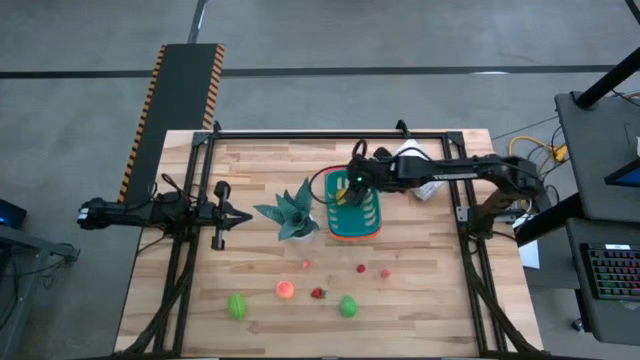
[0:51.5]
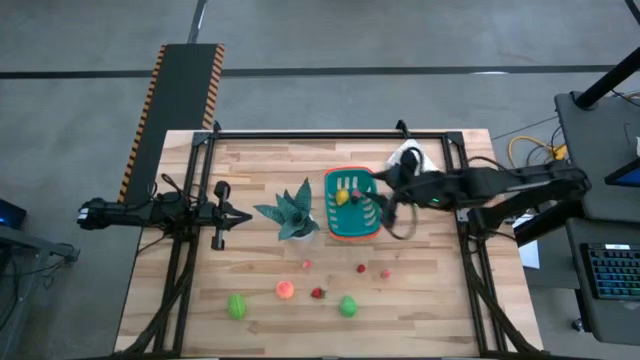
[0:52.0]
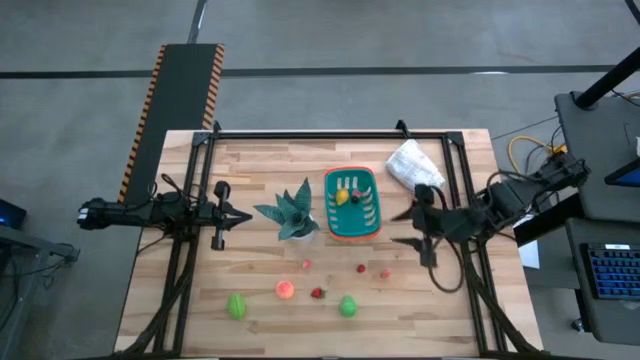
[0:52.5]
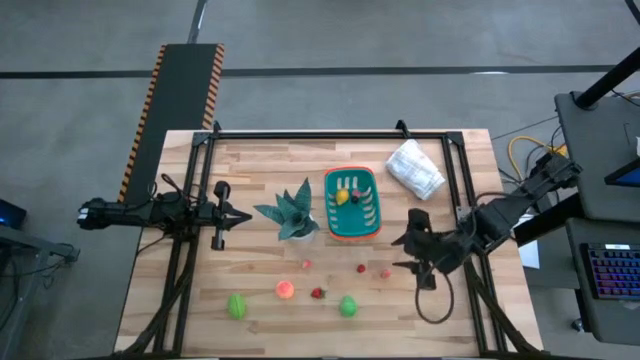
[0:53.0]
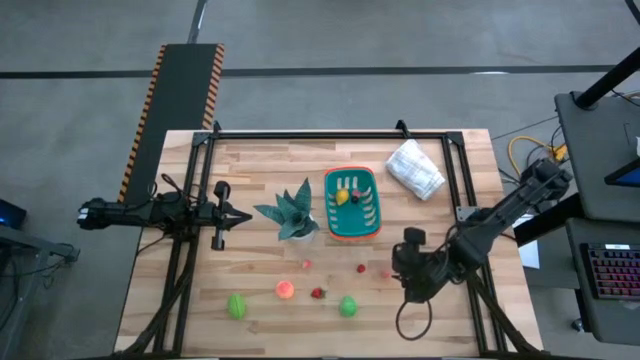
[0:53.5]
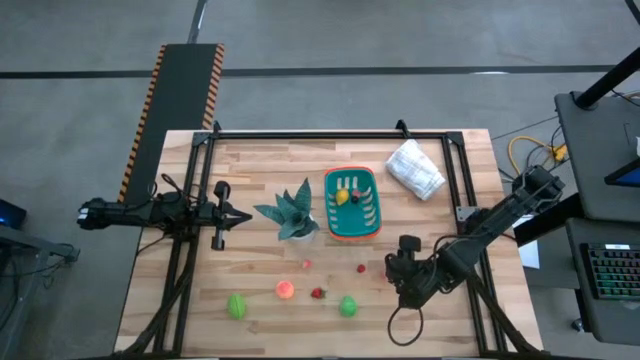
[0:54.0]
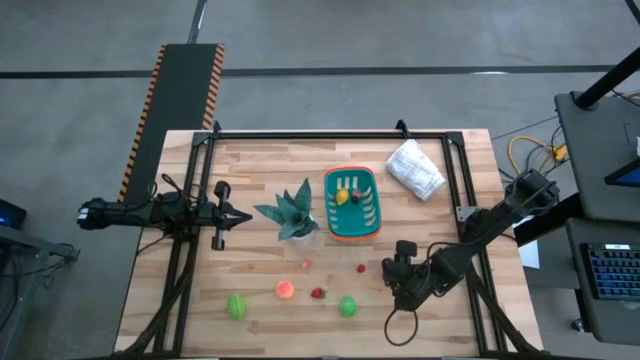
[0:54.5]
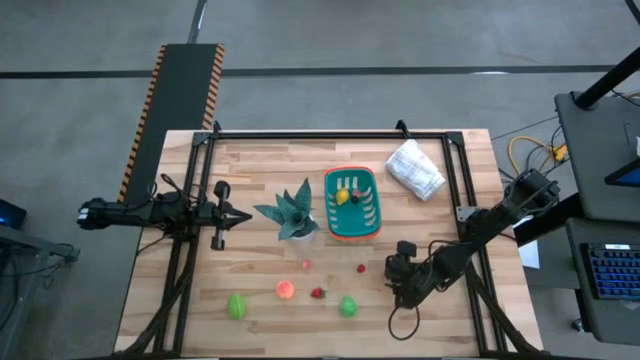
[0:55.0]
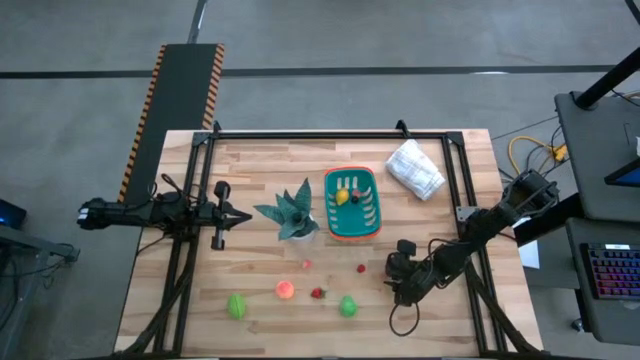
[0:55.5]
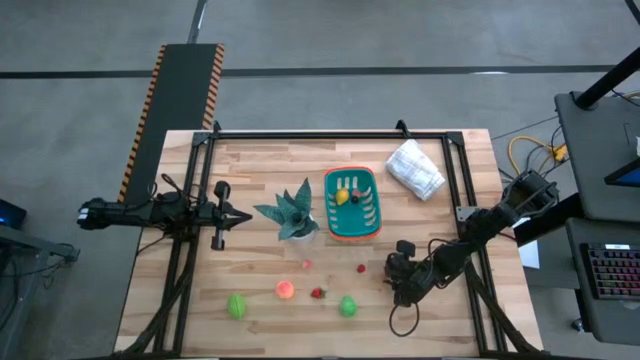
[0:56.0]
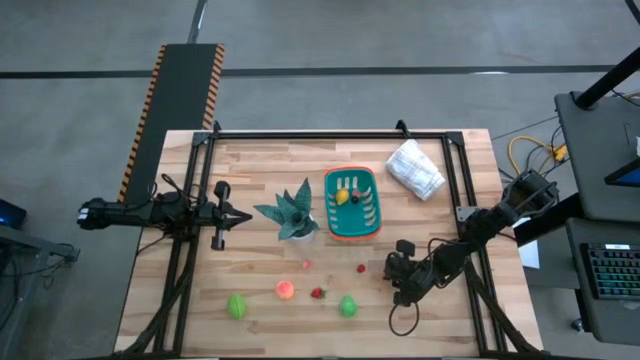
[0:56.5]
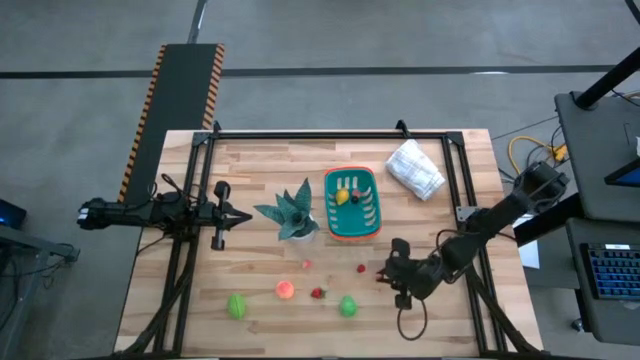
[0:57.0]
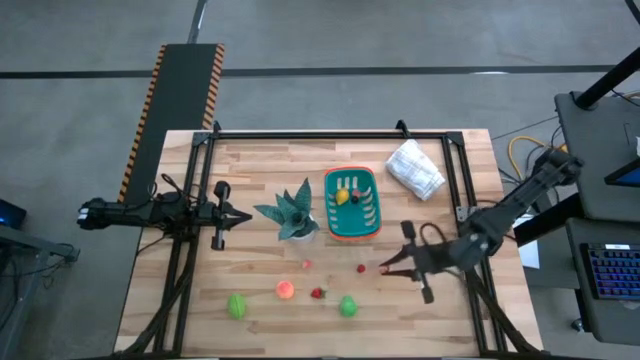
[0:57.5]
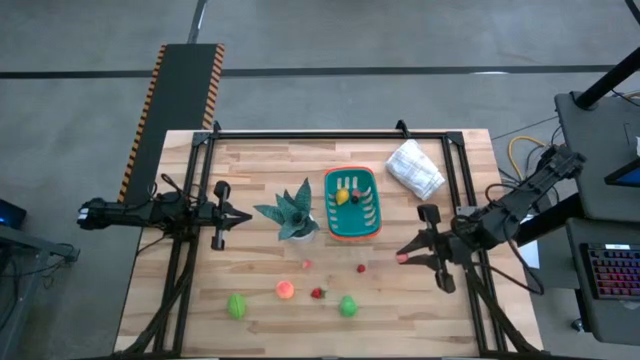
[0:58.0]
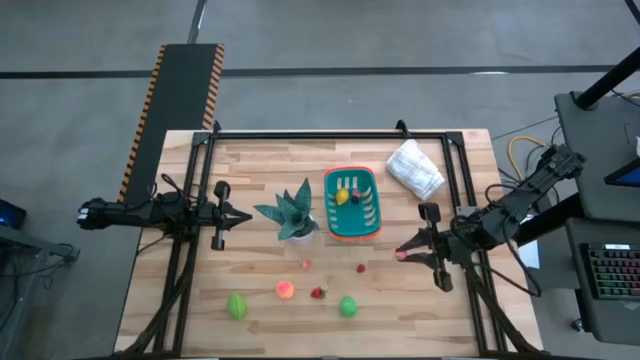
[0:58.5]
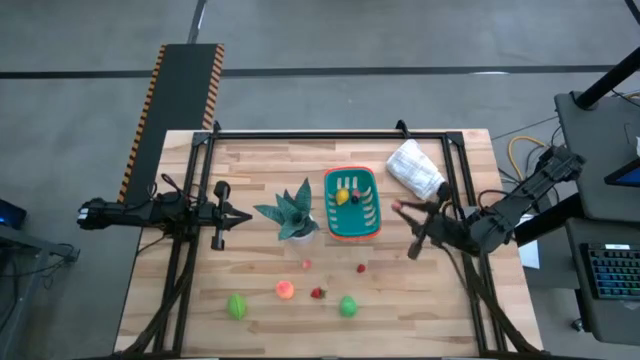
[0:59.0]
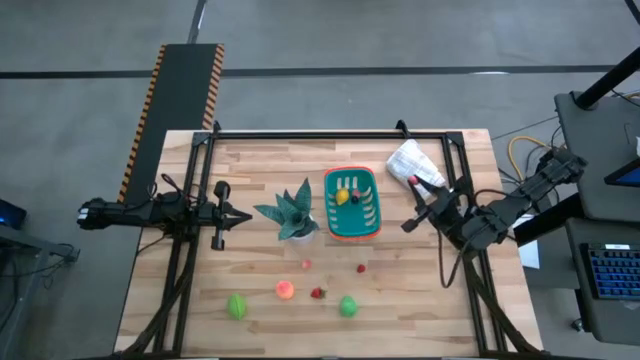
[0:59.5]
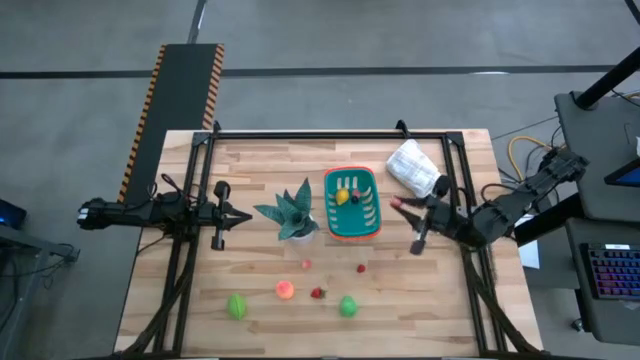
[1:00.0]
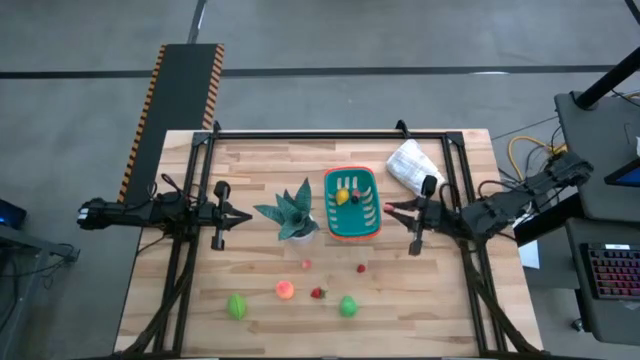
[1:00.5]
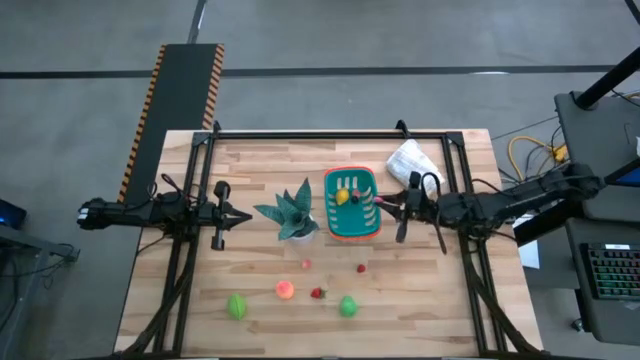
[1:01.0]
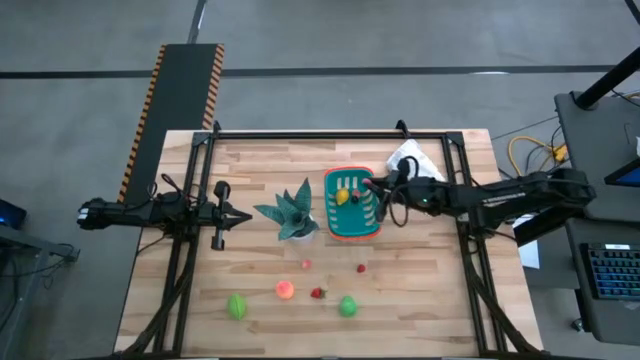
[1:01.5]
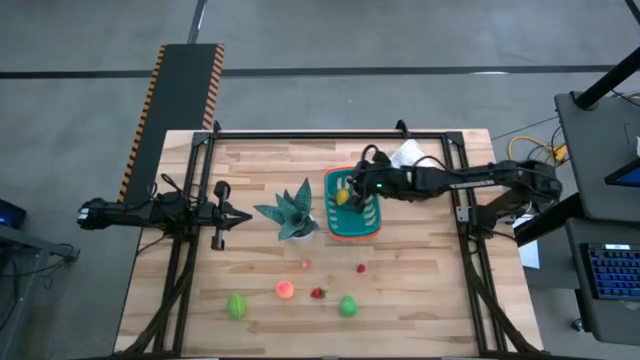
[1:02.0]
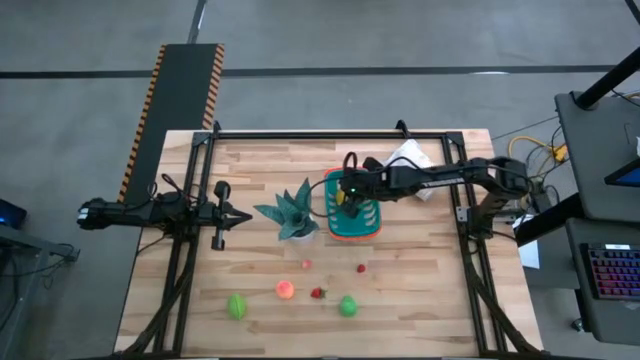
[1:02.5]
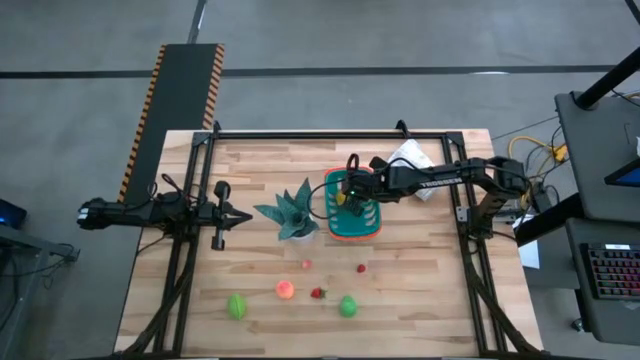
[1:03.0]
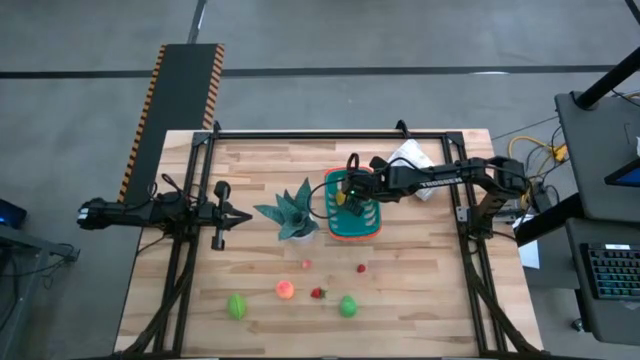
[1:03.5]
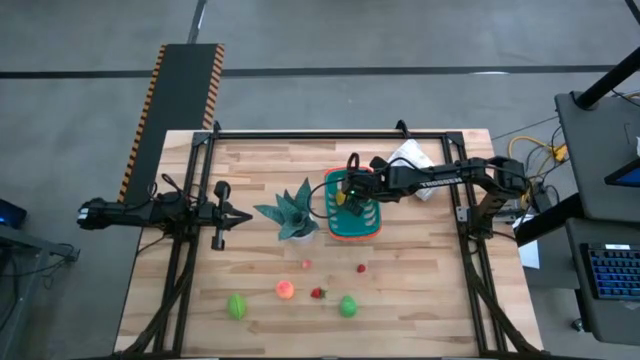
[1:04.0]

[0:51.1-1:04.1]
Task: Build produce basket
Put the right peach into the basket

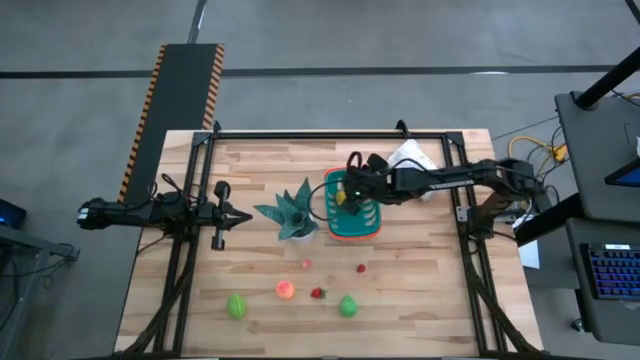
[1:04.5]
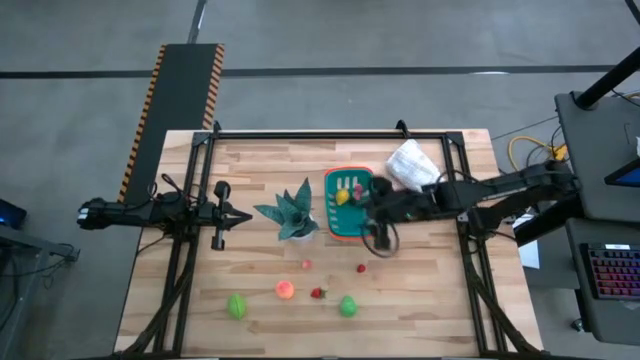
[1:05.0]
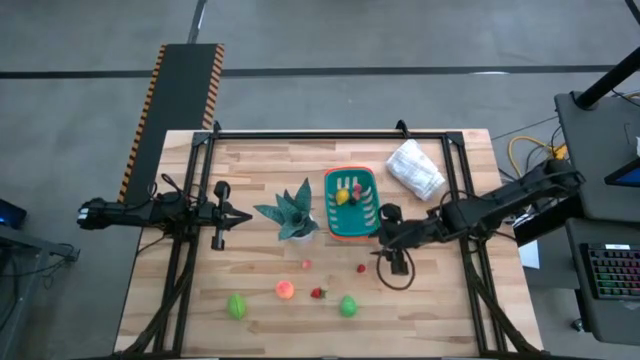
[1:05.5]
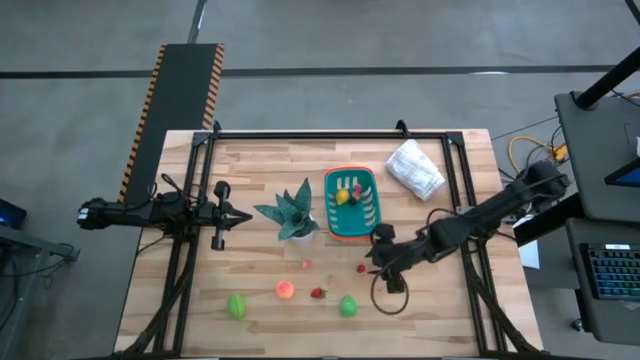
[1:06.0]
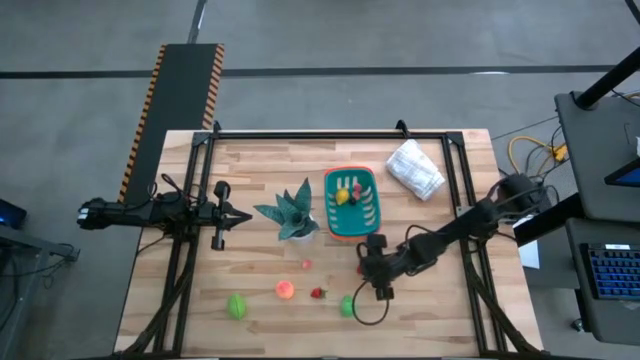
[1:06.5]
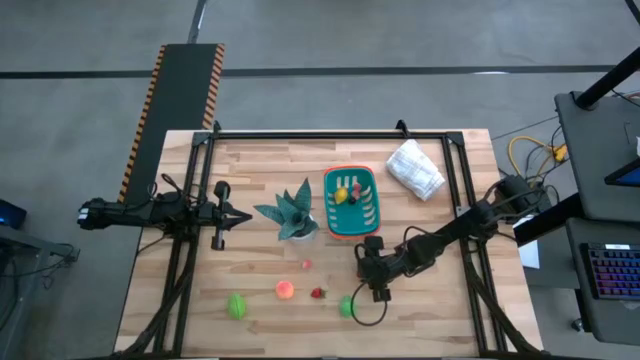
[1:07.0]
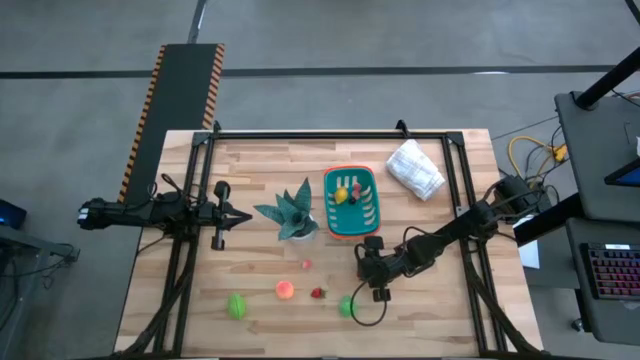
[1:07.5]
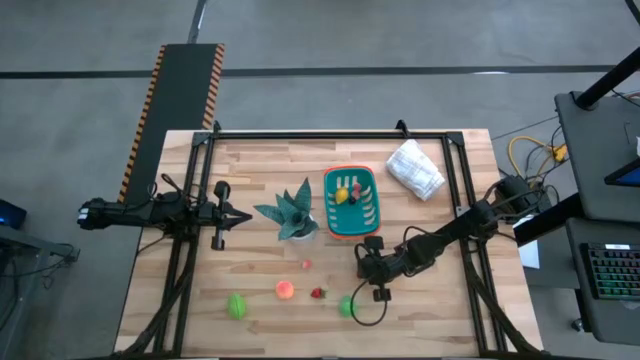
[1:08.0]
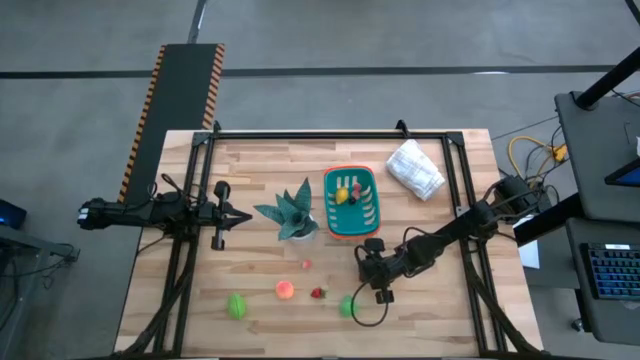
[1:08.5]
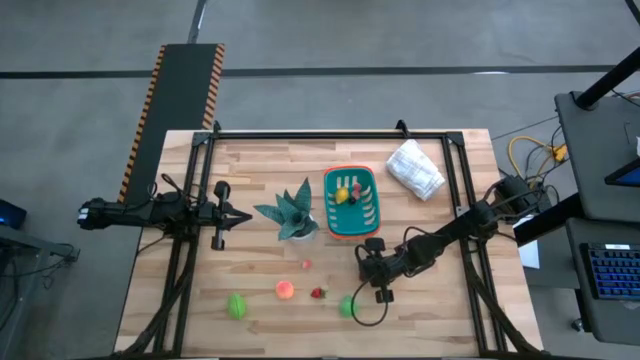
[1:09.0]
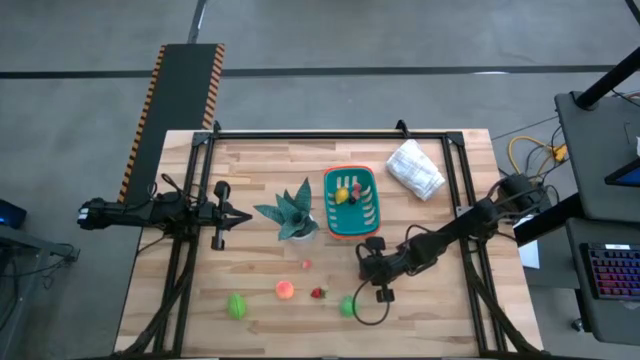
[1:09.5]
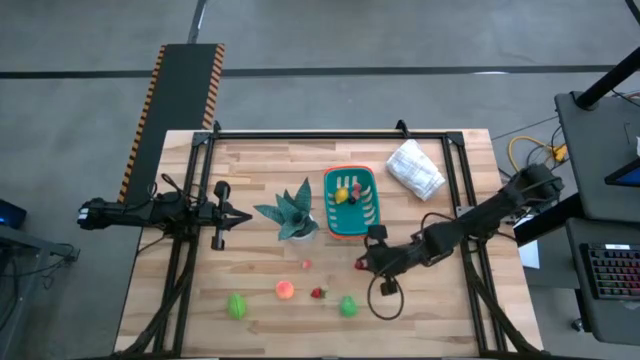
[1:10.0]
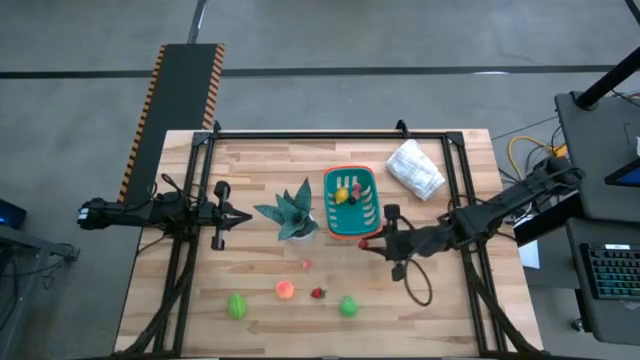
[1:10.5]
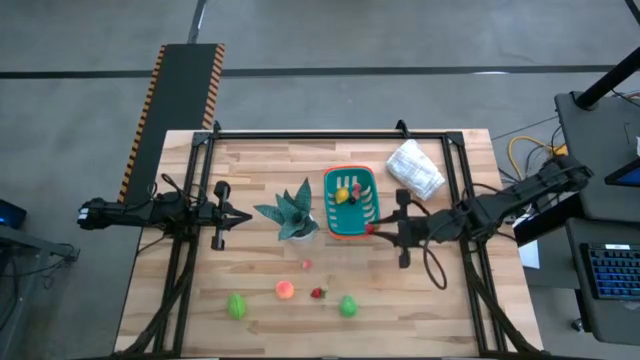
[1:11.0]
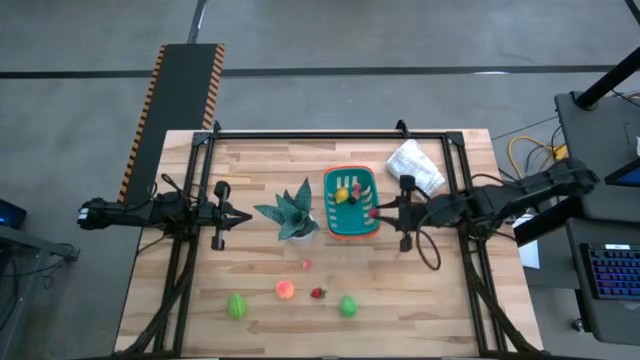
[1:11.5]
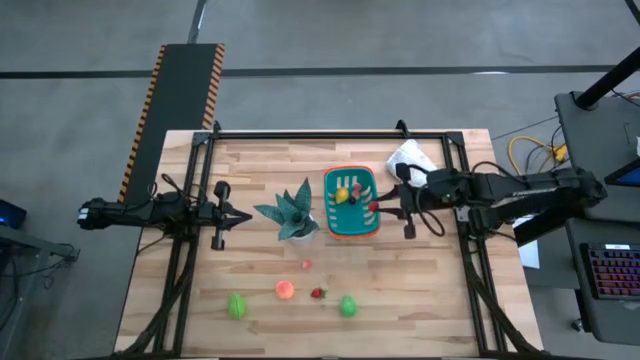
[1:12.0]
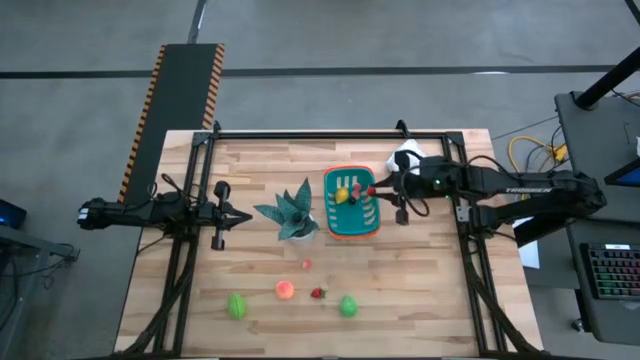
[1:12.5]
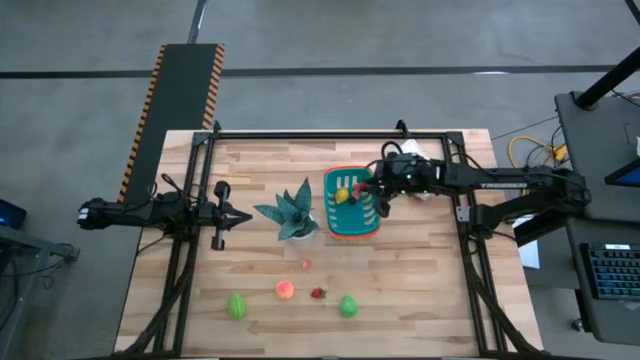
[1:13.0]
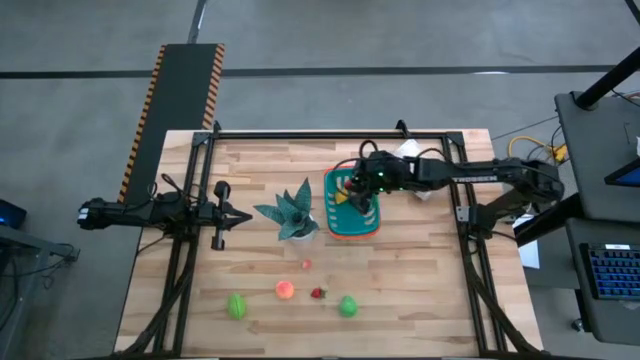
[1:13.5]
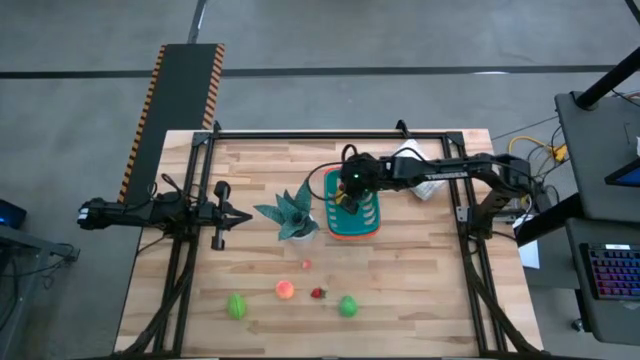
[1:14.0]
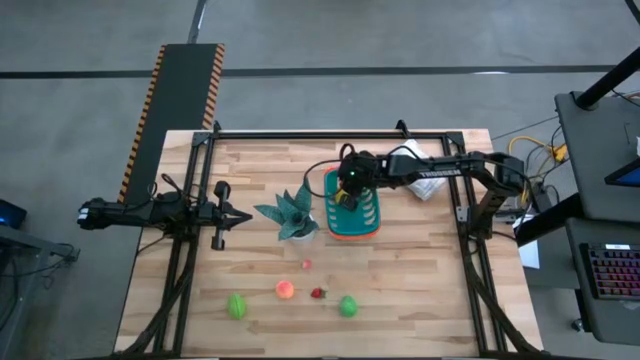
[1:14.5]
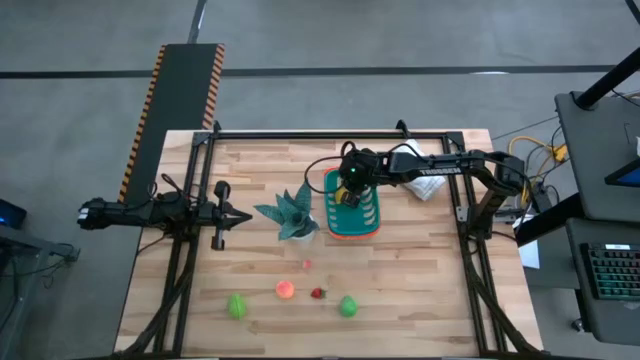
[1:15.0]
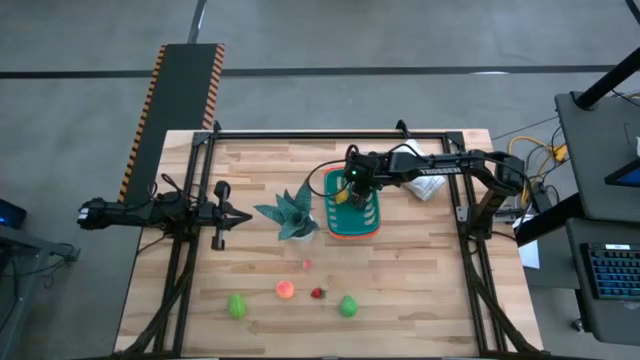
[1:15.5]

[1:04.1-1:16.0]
Put the raspberry into the basket
